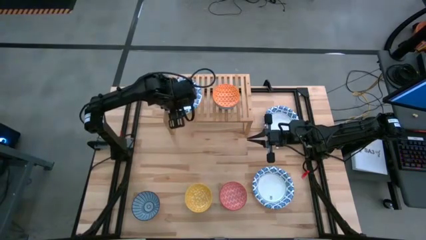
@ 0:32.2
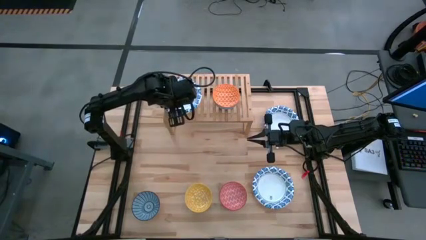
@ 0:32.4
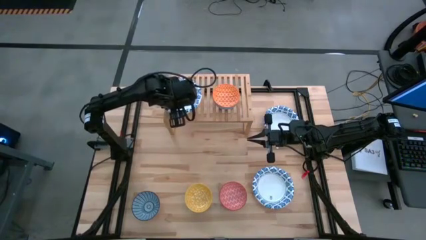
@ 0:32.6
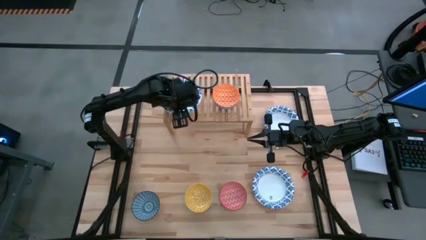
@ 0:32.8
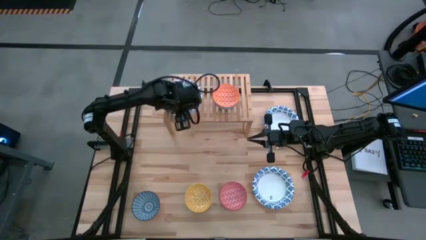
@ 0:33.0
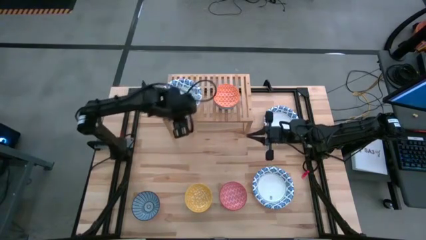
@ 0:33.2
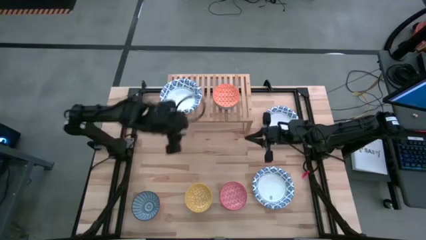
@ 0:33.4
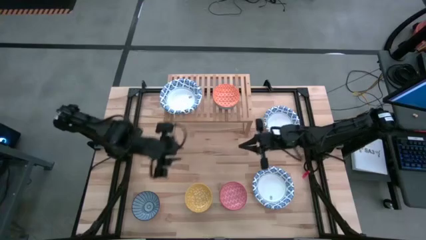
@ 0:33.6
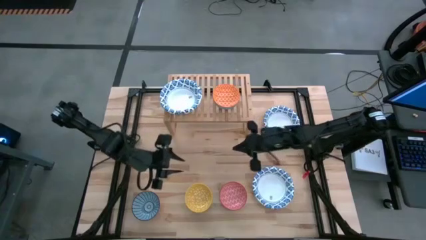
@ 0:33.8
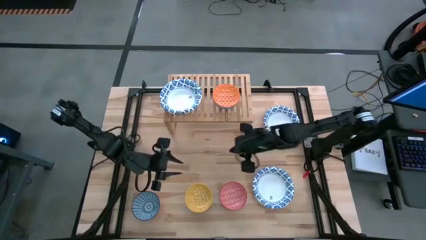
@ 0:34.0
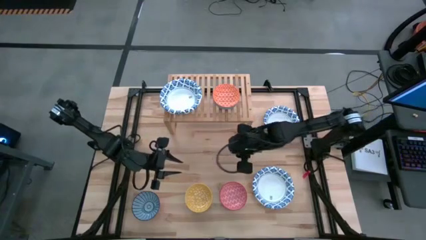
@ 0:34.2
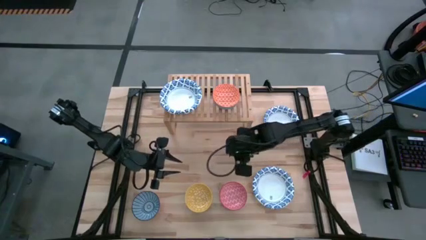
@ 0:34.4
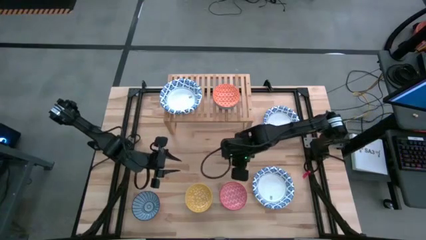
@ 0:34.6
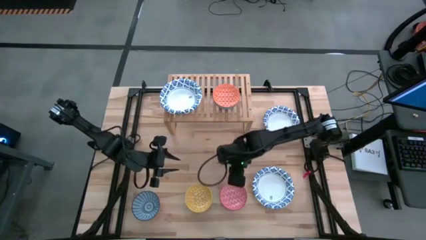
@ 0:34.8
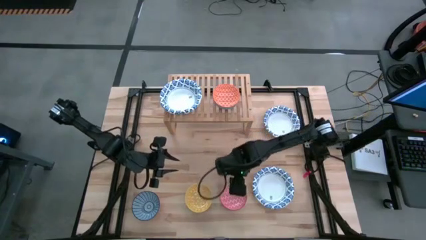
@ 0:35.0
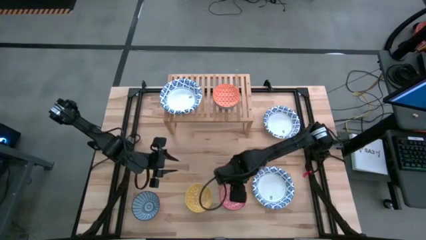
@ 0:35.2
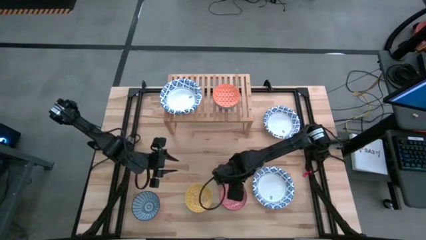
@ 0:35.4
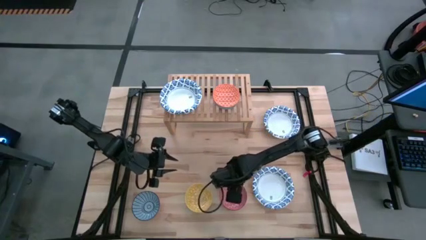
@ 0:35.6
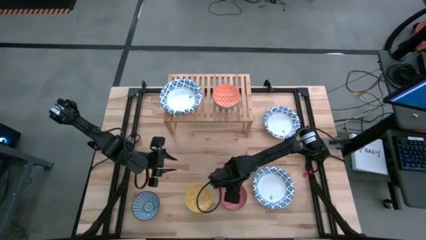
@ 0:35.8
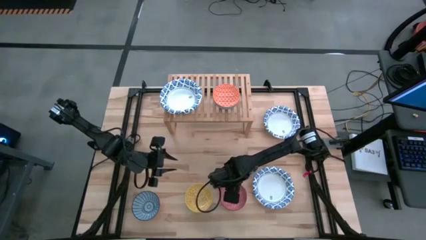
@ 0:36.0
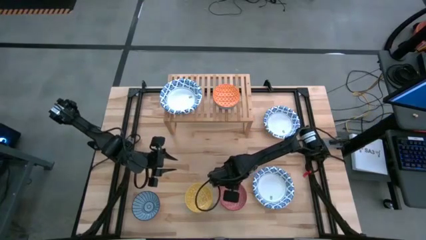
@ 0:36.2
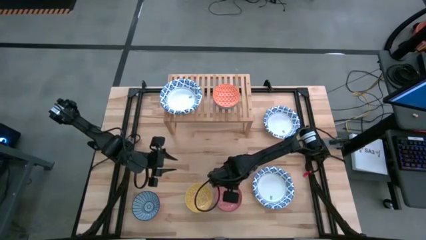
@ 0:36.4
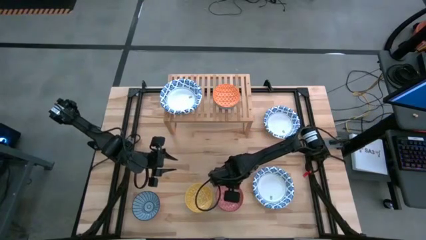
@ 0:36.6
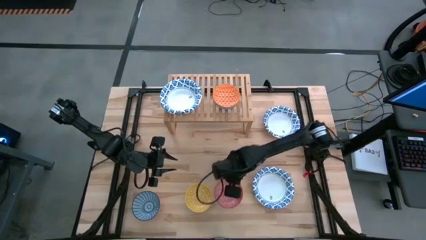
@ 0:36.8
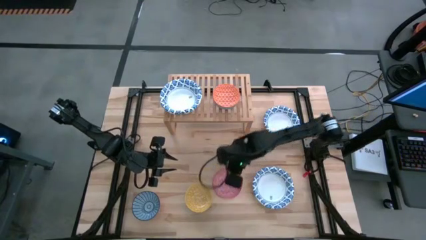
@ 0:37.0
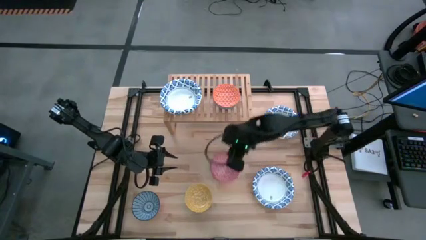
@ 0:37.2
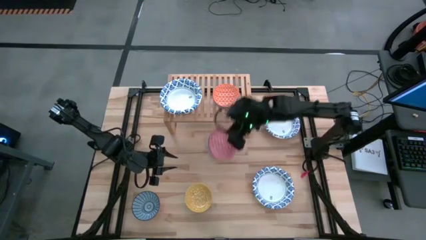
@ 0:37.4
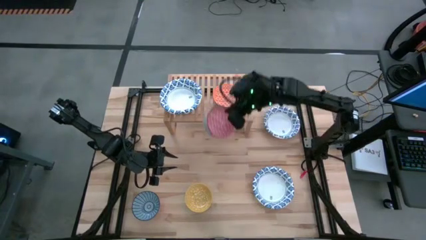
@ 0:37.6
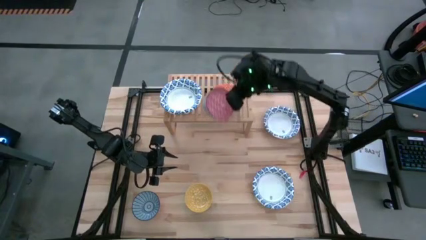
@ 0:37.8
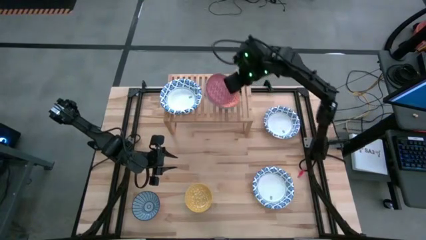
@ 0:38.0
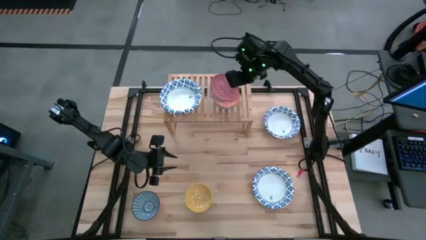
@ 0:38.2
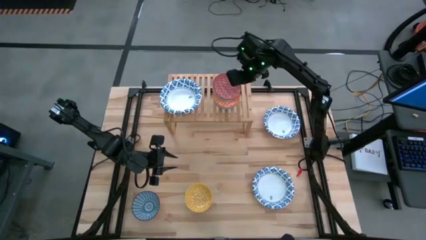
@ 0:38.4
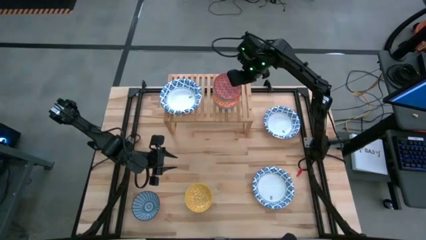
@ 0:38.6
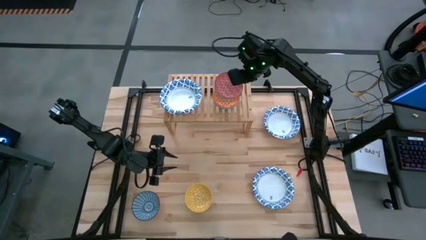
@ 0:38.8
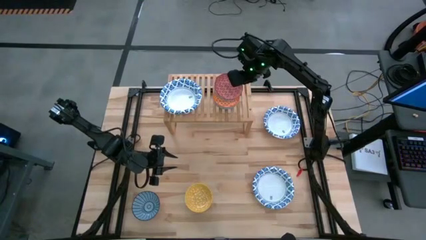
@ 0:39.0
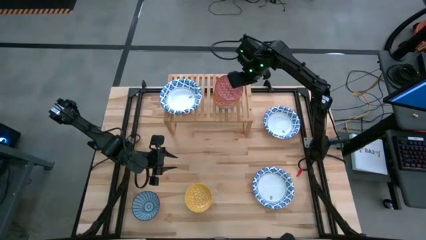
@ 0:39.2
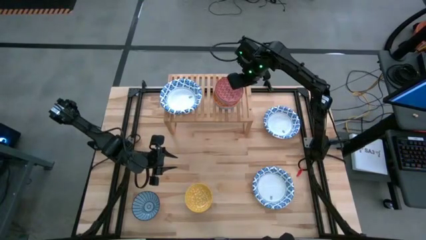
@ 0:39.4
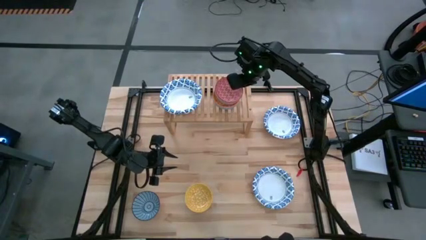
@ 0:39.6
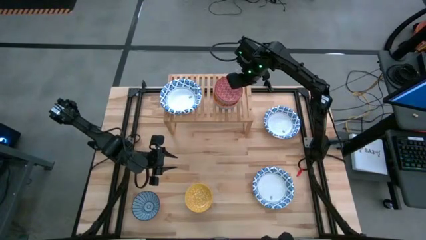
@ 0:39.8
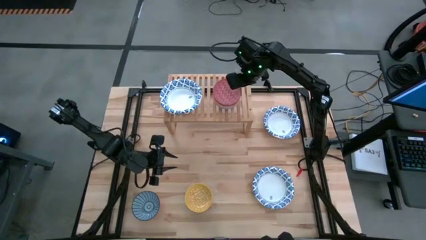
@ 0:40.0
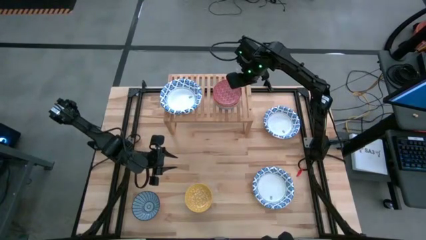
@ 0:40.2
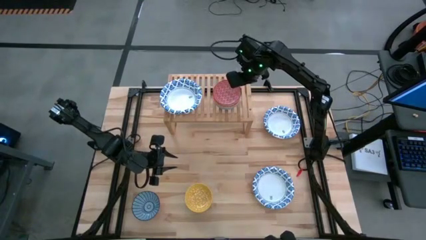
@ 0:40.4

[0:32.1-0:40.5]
Task: Place and stack bowls onto a shelf
Stack the red patterned bowl on top of the orange patterned bowl on the shelf

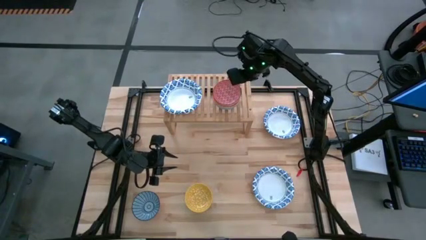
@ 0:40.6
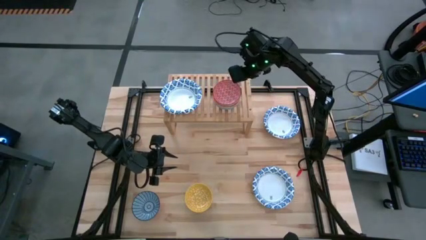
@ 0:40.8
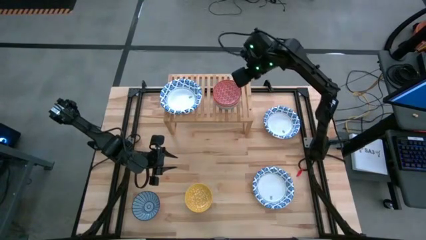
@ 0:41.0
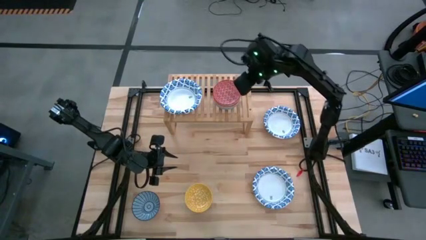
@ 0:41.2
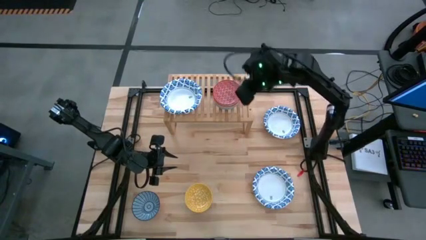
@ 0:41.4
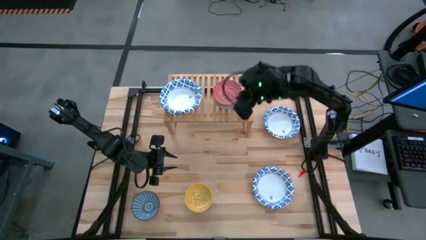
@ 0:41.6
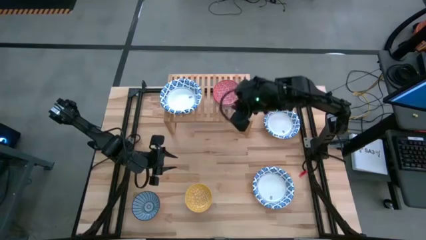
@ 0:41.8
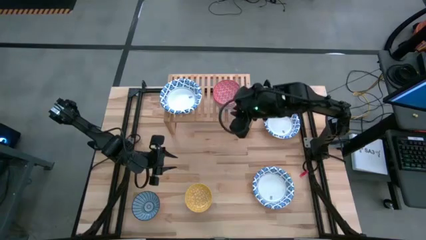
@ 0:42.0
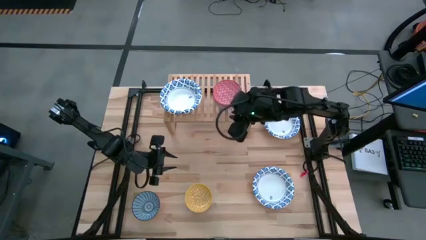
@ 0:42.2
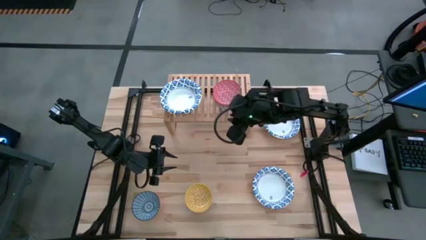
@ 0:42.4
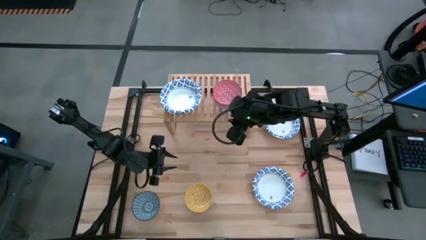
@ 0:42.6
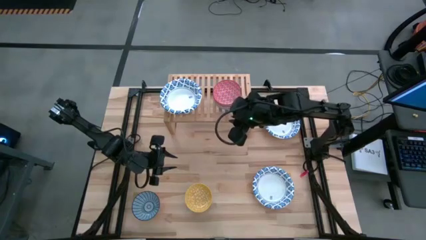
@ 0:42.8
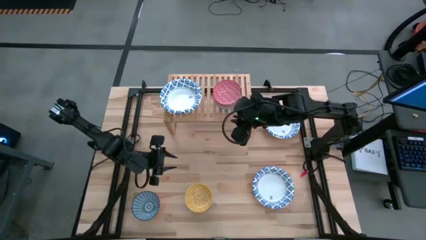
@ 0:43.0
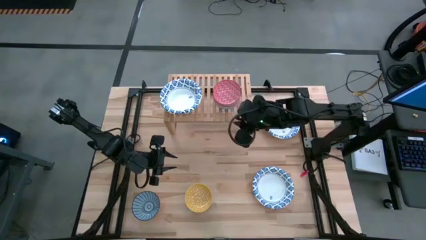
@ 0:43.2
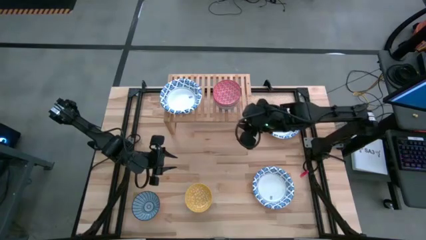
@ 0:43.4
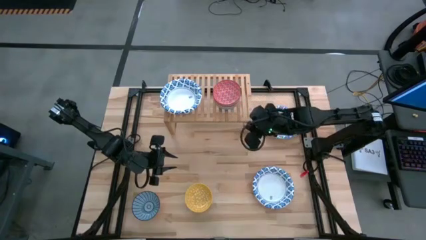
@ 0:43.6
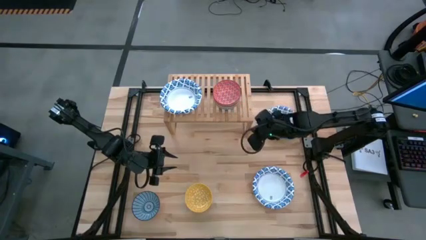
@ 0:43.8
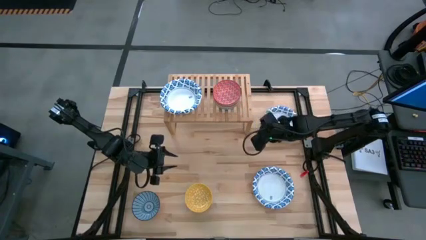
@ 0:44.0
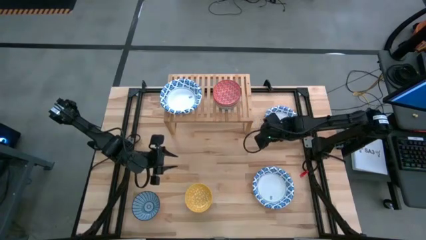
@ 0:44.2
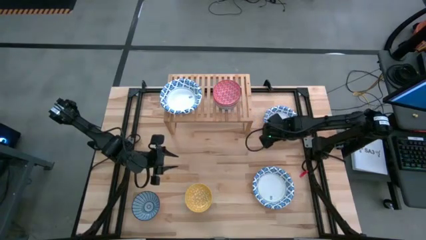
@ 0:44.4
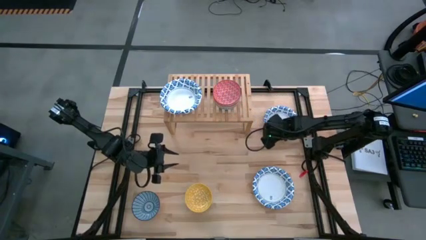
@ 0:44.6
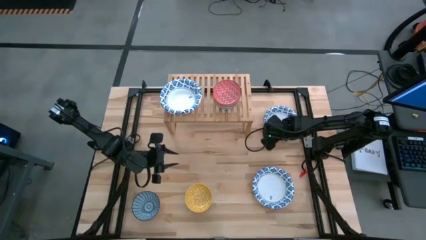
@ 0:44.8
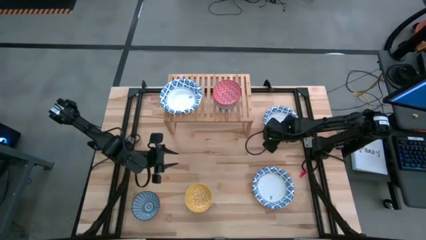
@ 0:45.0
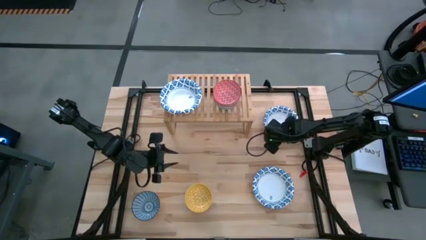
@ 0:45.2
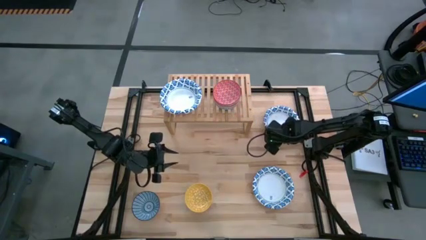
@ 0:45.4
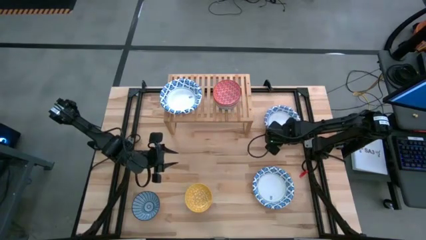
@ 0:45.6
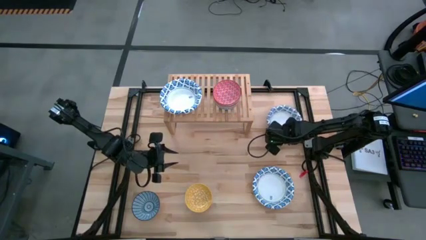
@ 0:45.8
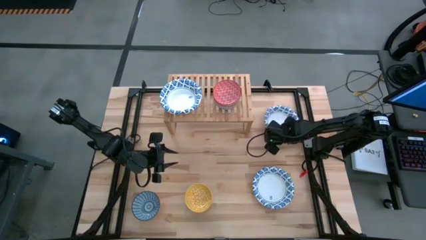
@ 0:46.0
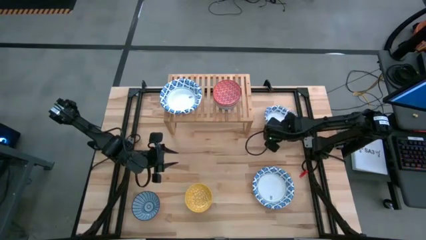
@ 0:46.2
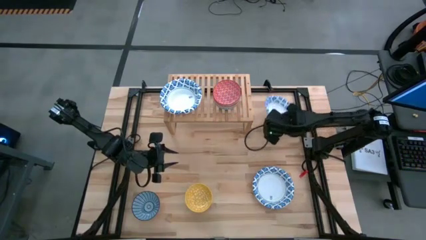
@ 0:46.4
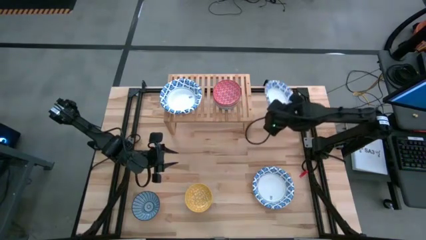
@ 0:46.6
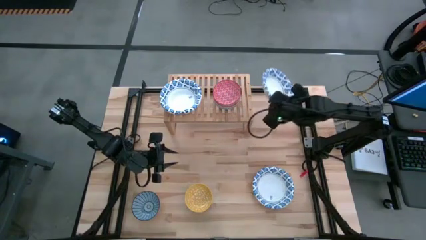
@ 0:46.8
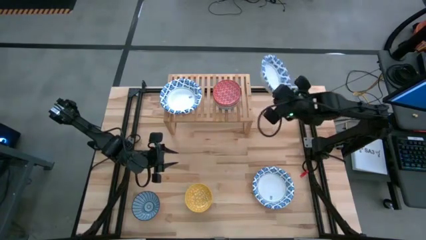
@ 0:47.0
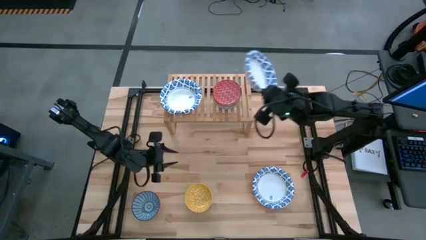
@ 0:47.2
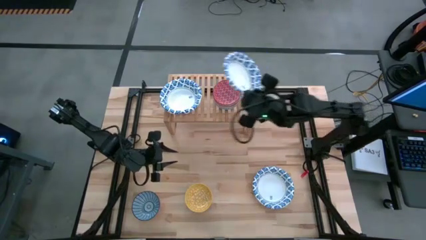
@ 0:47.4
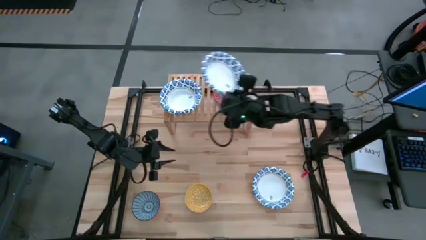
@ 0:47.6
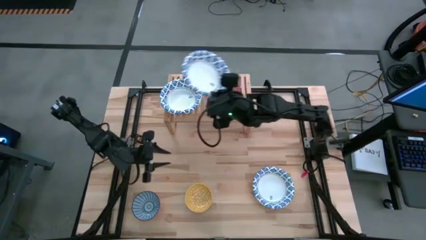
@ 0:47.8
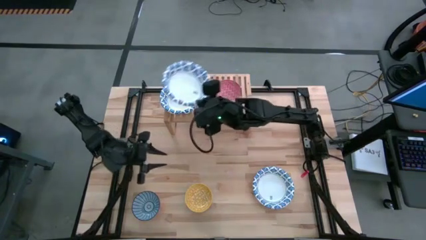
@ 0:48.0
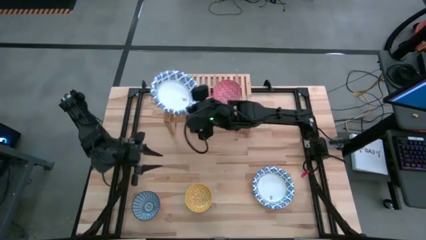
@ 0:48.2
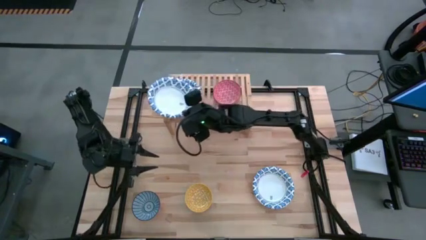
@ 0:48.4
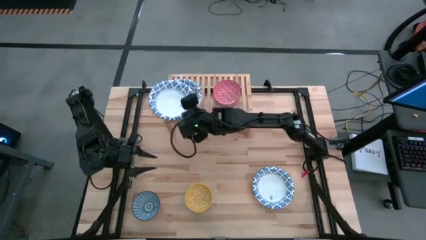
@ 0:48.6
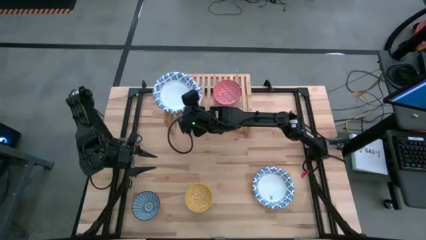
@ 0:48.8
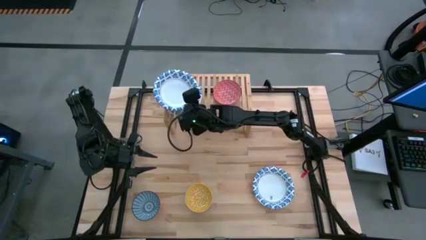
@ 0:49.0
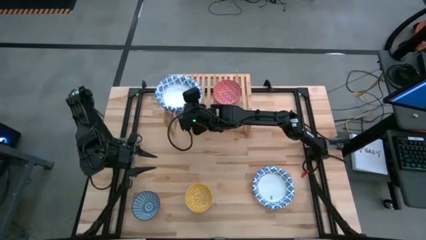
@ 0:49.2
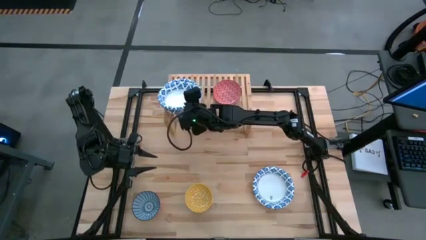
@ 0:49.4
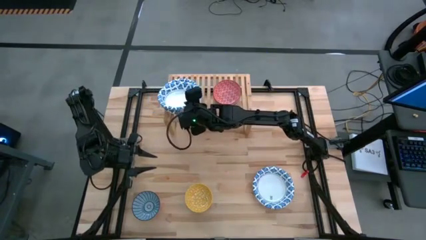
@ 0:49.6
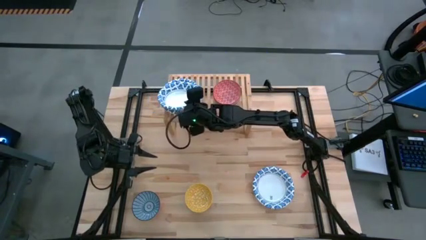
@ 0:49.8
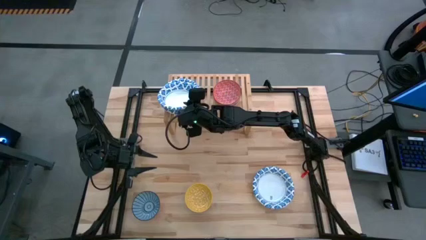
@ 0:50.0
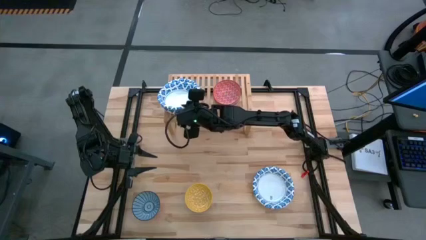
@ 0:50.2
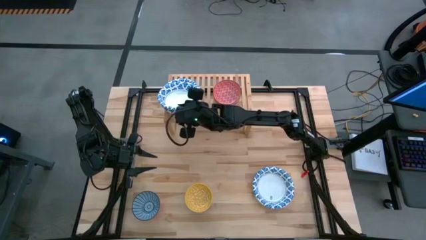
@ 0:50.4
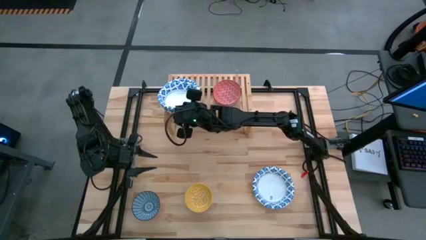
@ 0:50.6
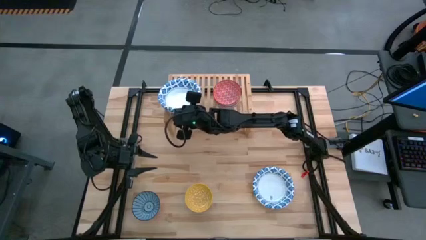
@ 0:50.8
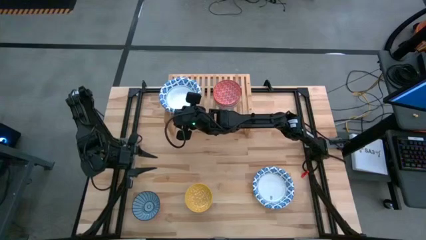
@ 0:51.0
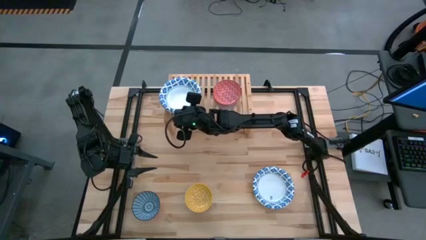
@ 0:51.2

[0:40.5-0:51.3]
Stack the white patterned bowl on top of the white patterned bowl on the shelf
